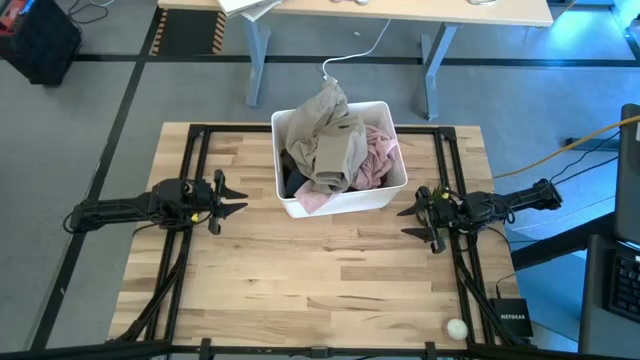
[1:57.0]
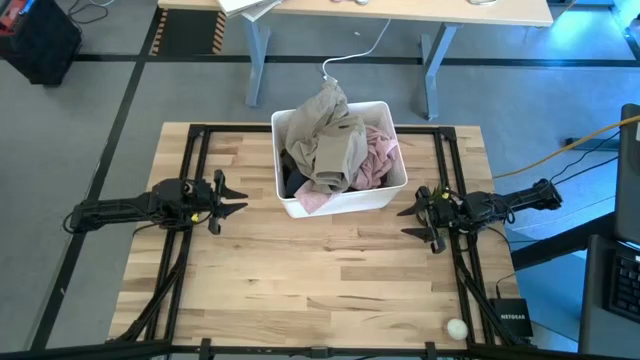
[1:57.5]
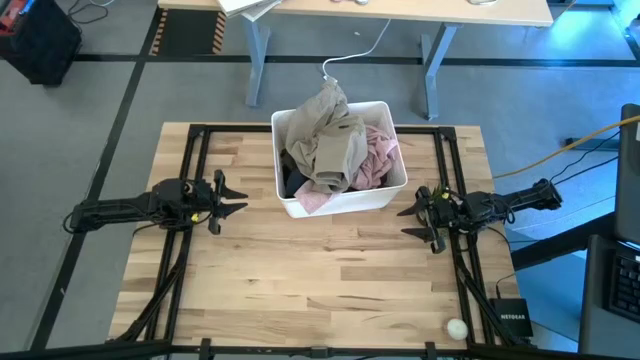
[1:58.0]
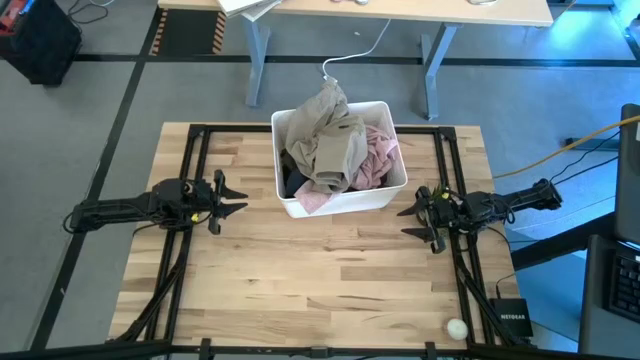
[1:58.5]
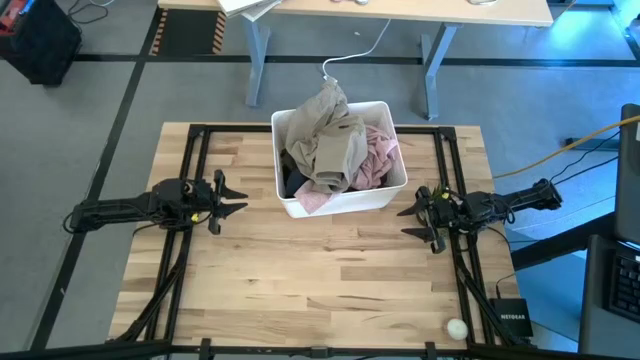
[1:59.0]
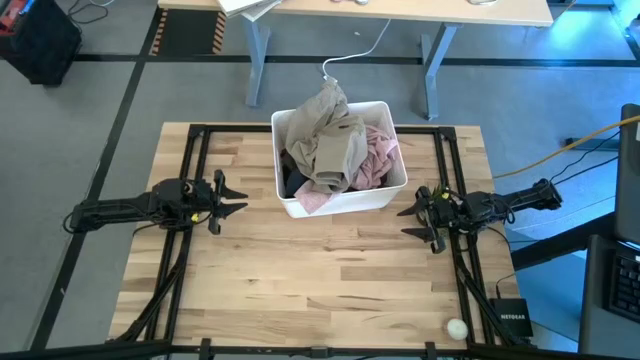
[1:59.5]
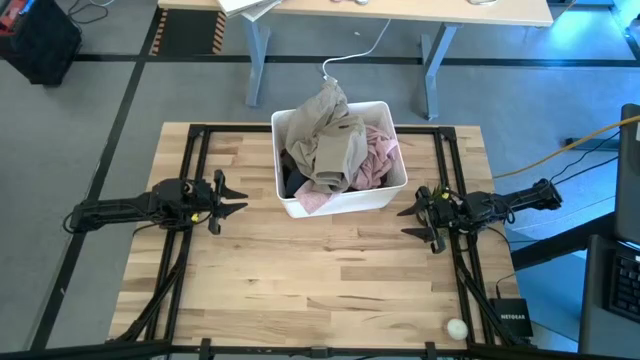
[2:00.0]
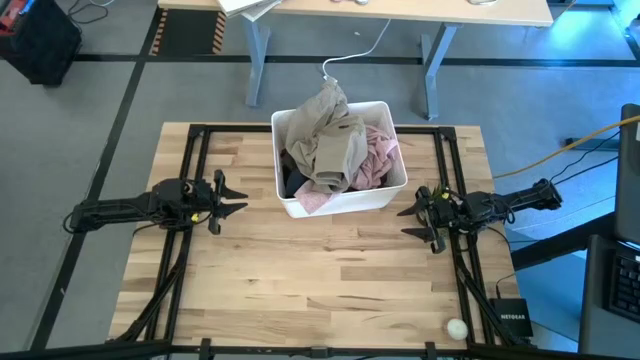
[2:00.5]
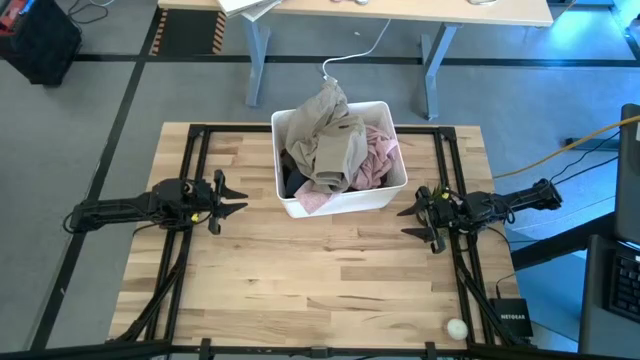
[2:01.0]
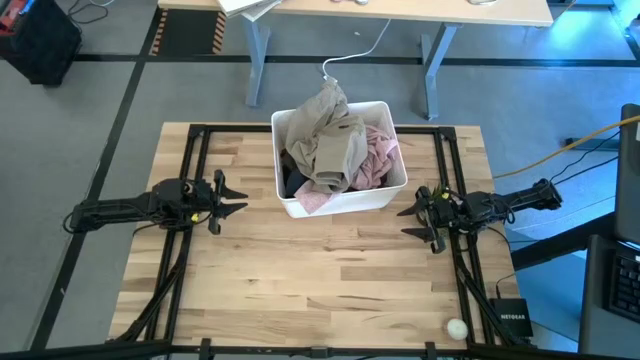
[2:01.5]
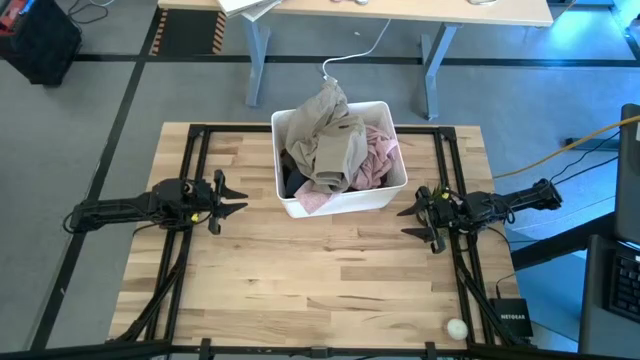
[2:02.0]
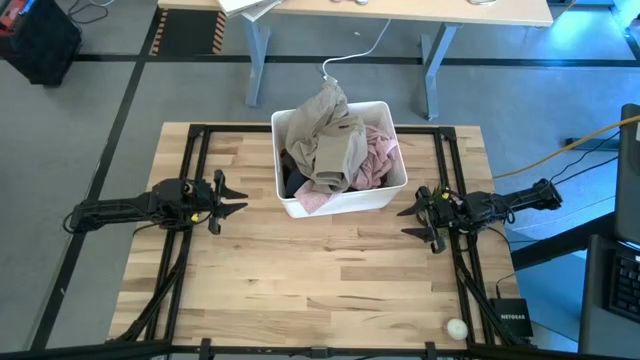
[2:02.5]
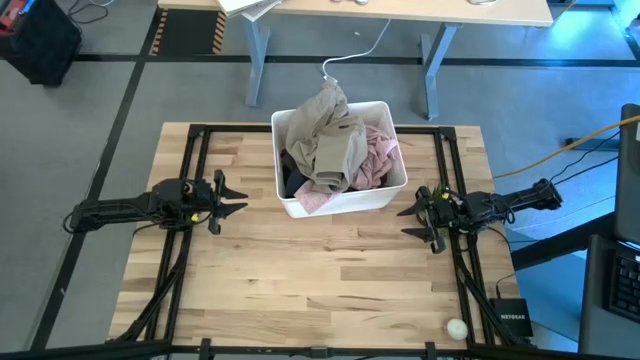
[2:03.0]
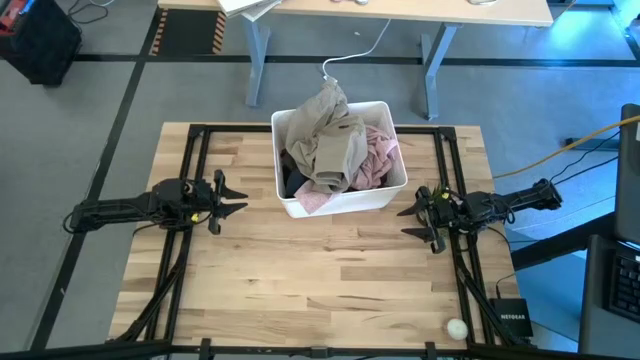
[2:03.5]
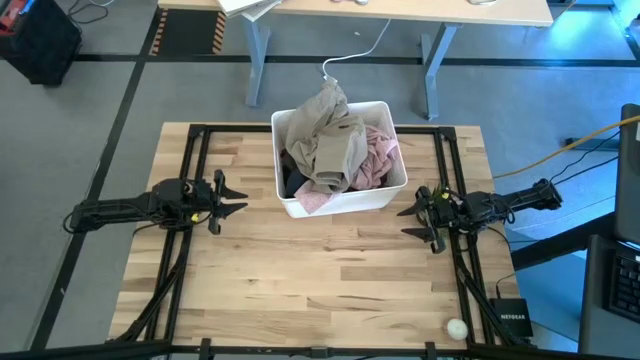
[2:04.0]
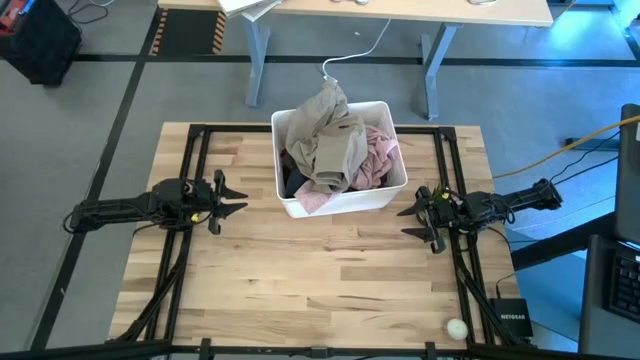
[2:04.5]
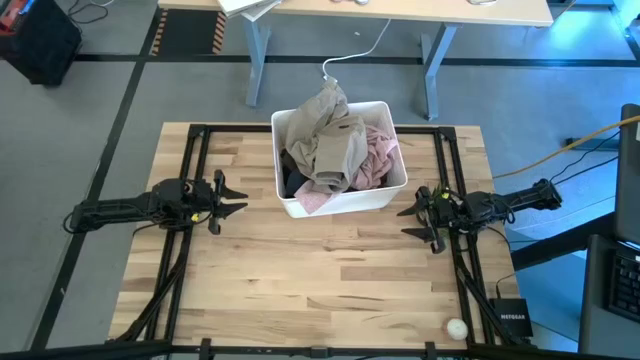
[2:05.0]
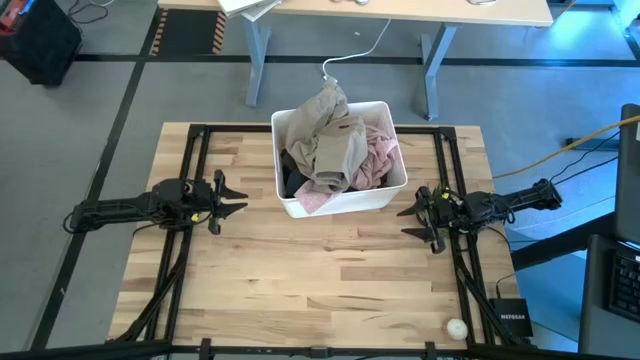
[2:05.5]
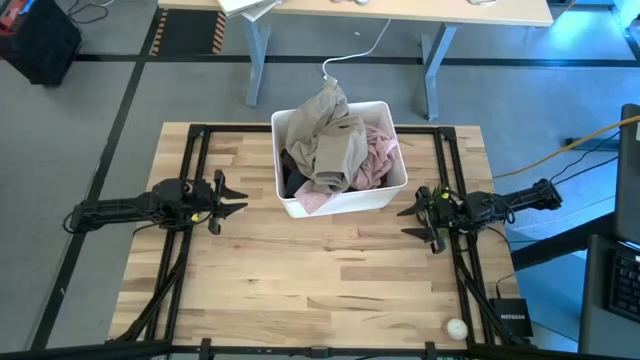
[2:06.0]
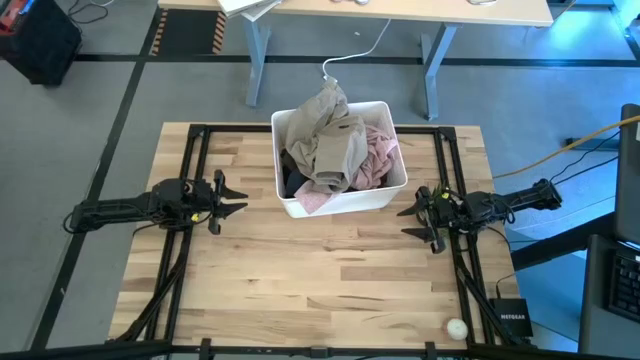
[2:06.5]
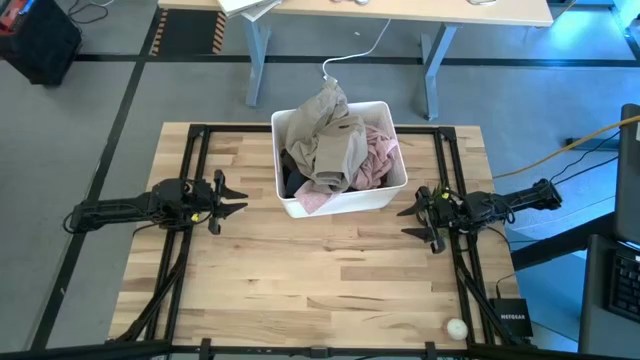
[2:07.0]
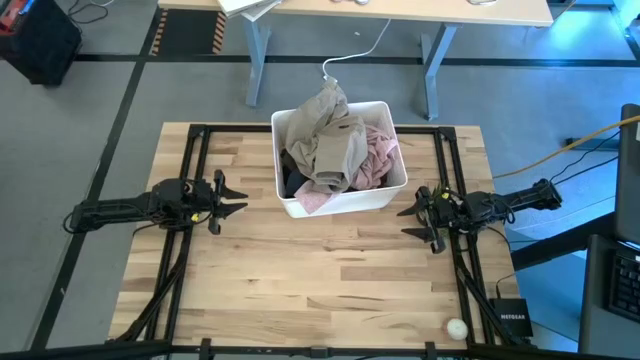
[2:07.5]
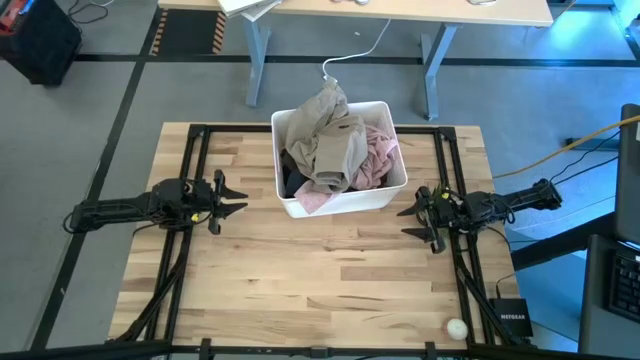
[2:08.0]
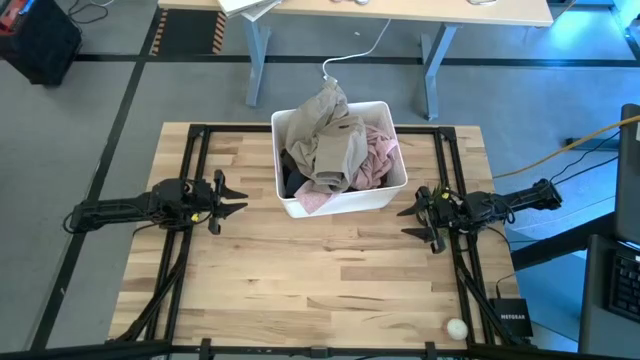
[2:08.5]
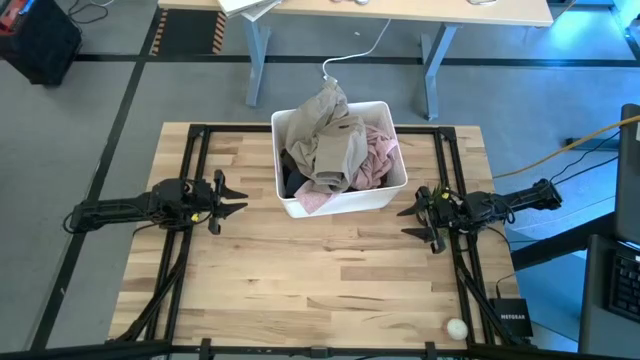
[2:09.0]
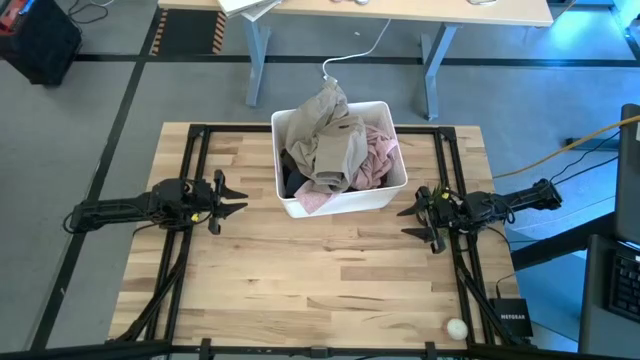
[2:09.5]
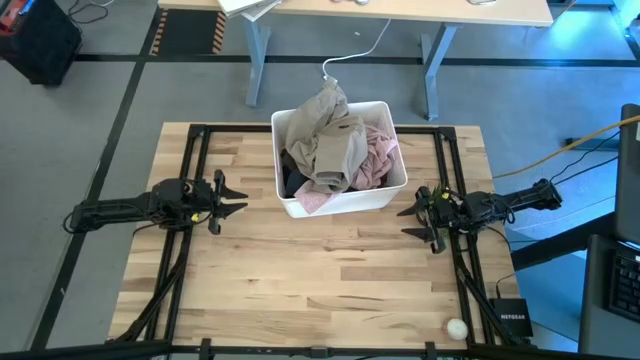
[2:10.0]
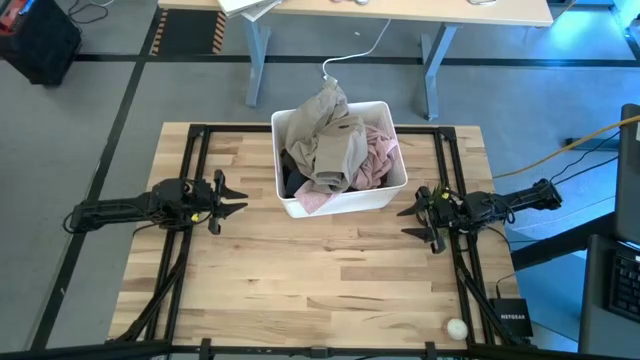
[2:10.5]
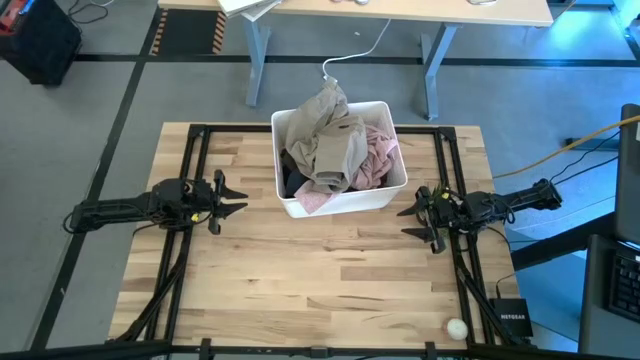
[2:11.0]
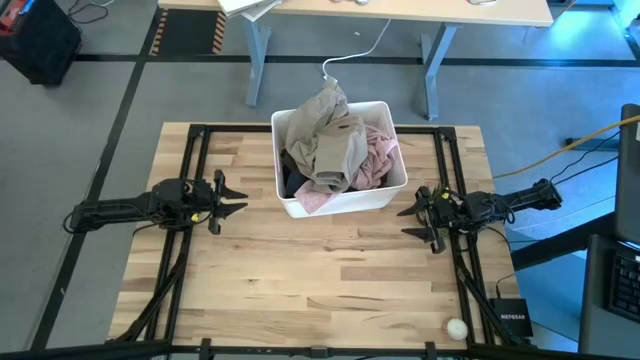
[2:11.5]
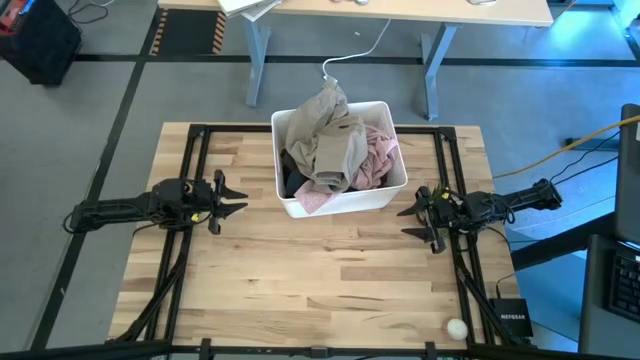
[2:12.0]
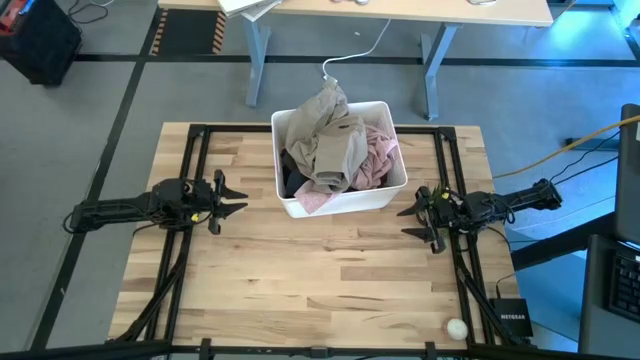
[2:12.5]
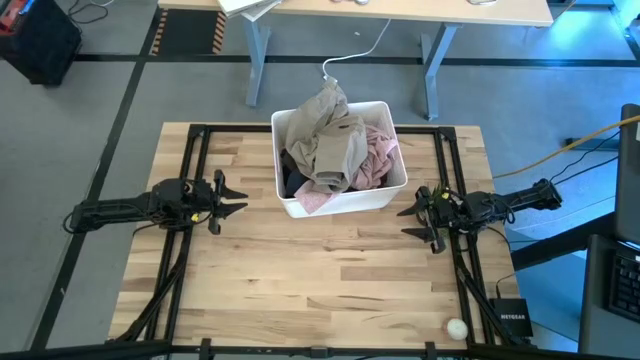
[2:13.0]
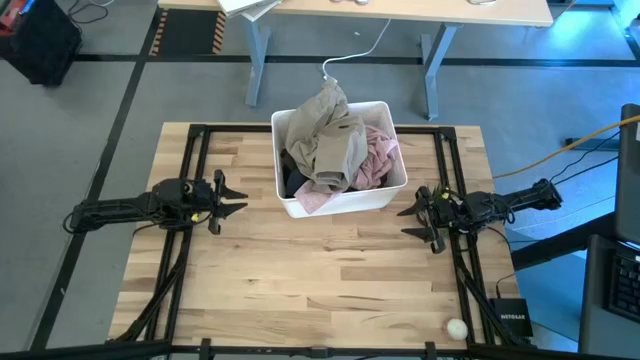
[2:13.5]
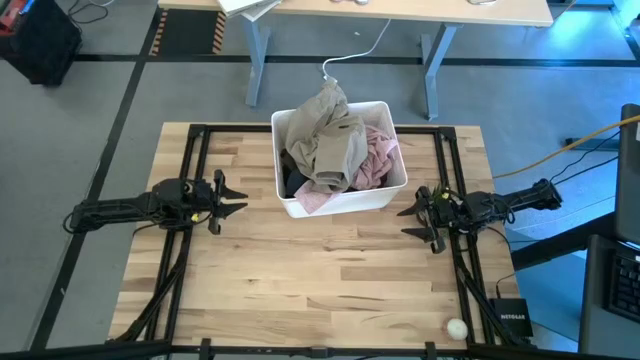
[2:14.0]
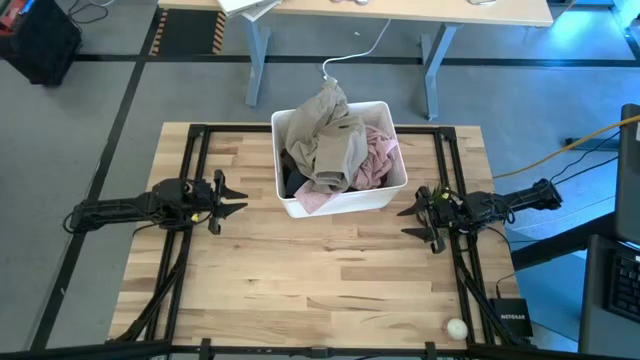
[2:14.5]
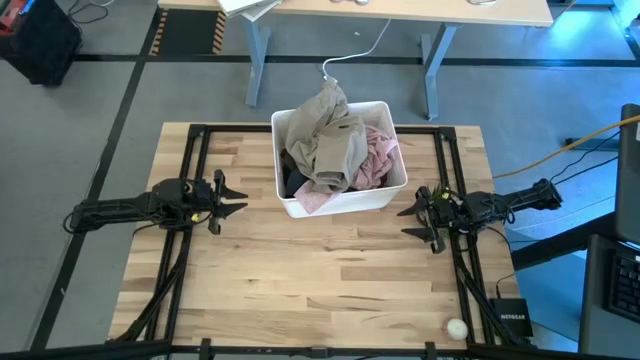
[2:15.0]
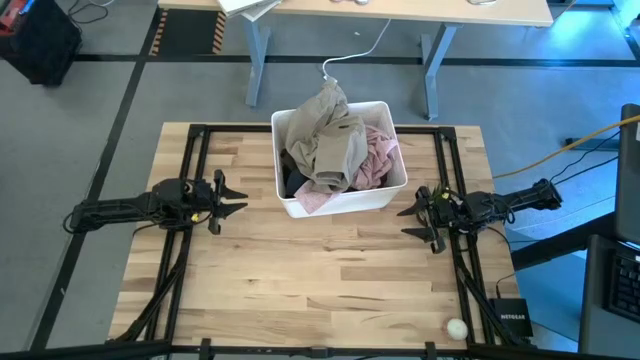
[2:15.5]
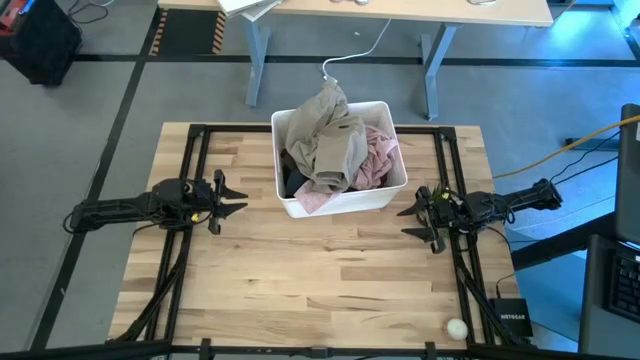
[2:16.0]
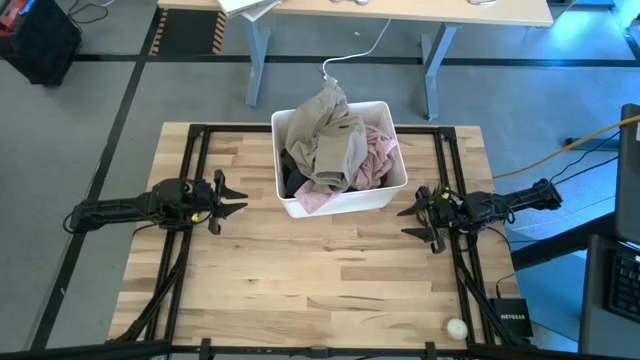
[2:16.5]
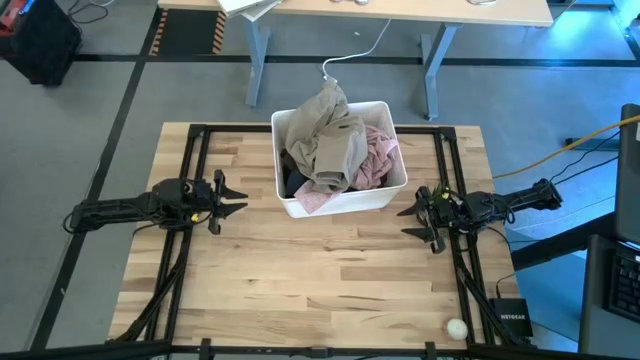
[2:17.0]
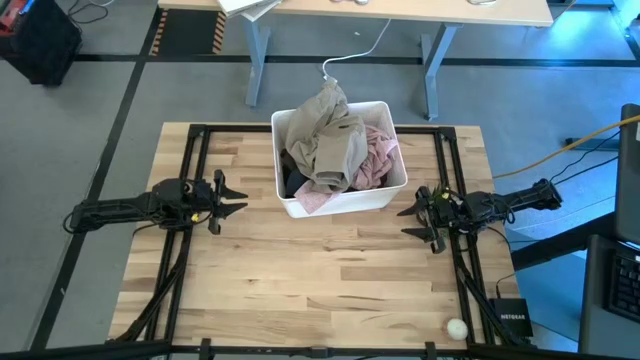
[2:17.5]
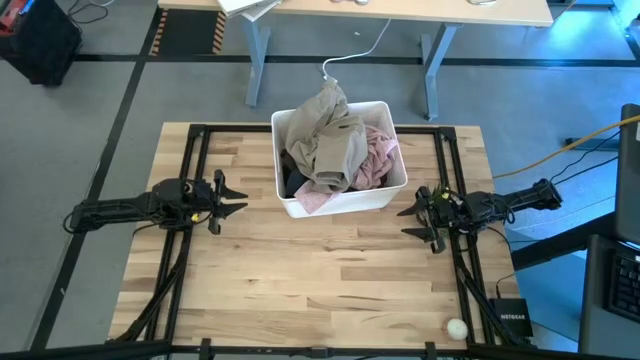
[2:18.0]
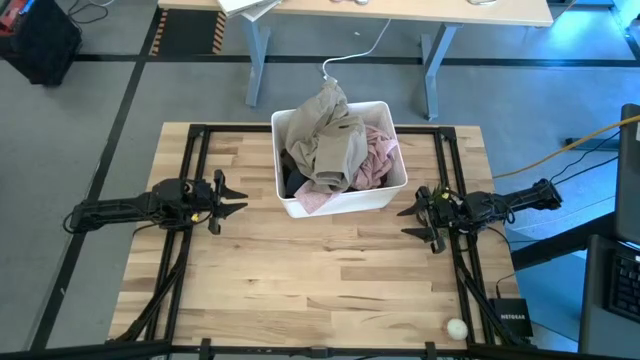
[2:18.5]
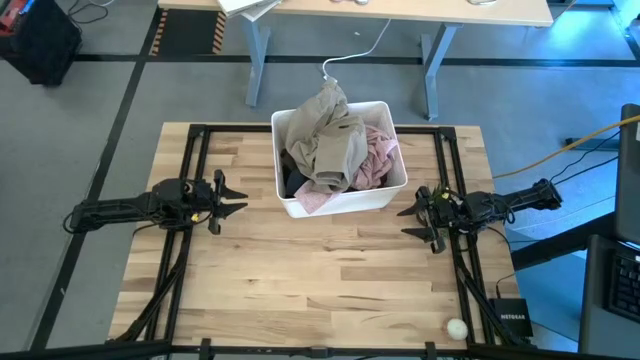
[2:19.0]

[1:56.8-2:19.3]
Task: Sort clothes
Return to Home Position
